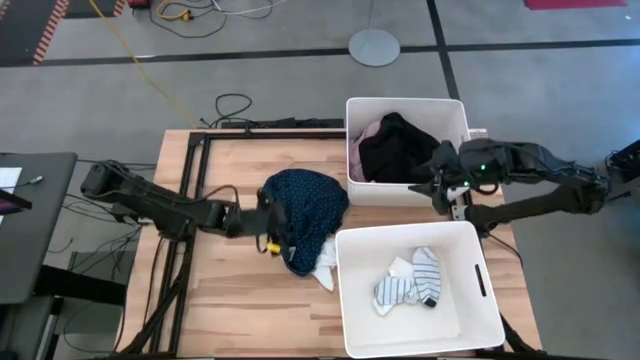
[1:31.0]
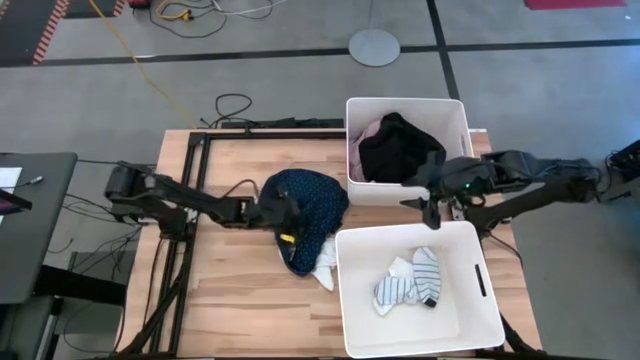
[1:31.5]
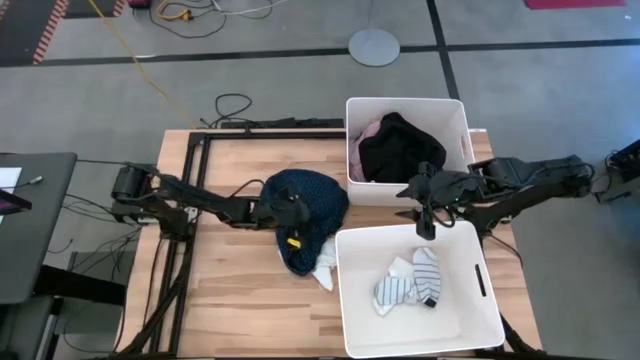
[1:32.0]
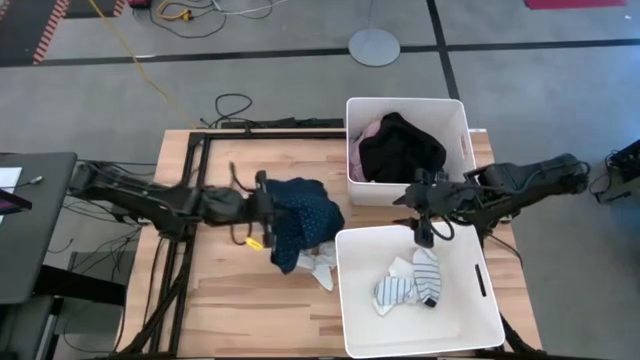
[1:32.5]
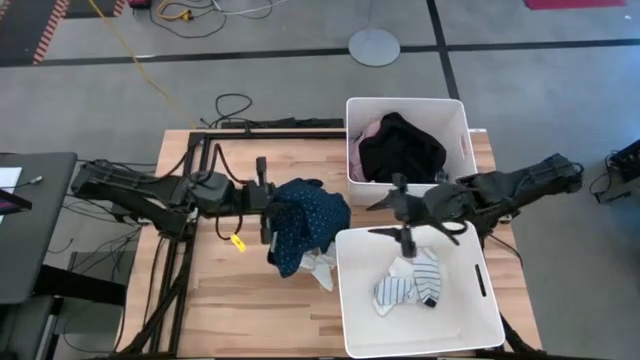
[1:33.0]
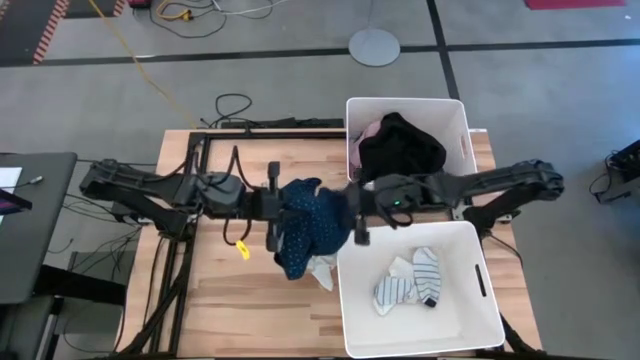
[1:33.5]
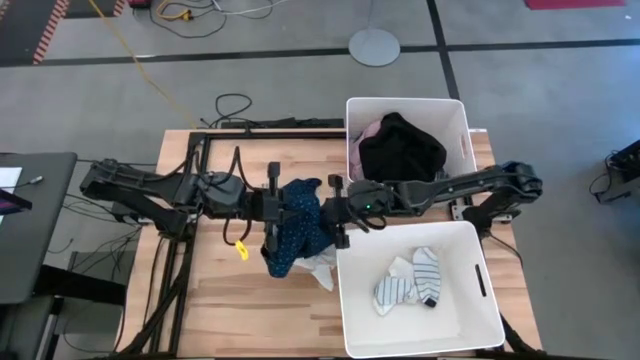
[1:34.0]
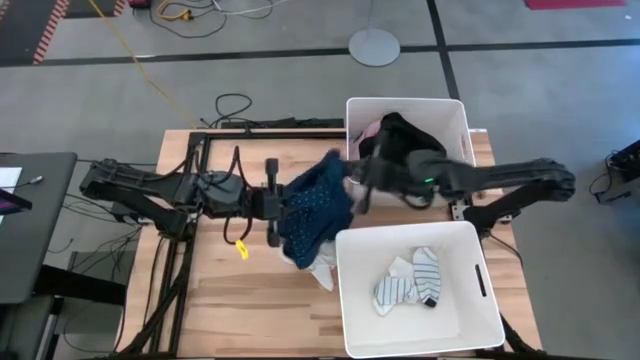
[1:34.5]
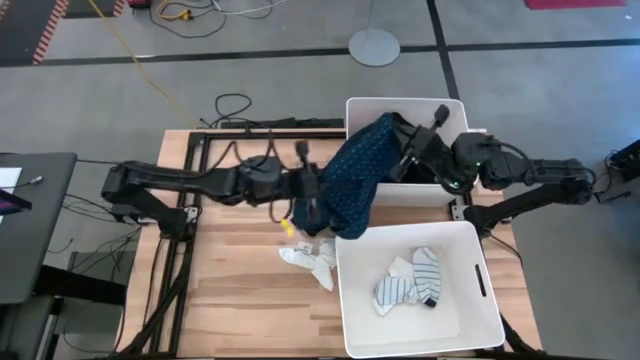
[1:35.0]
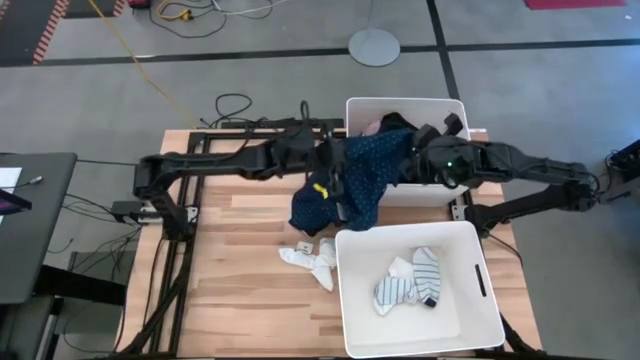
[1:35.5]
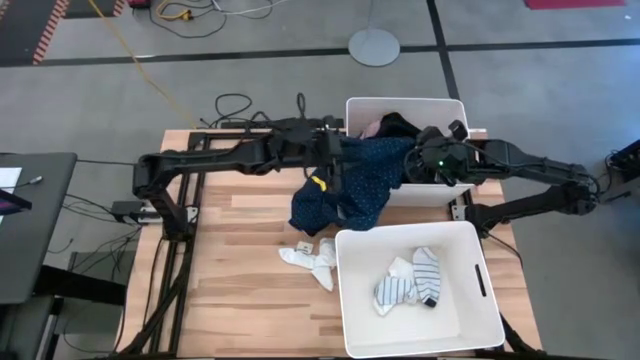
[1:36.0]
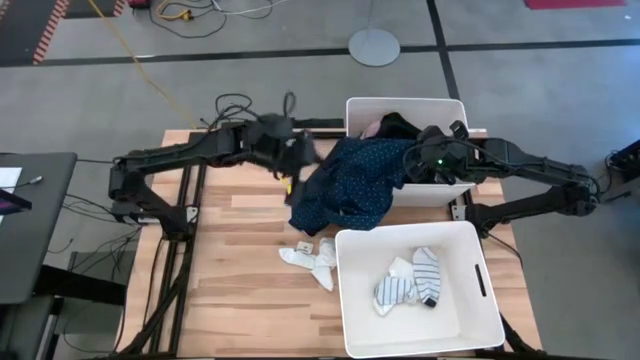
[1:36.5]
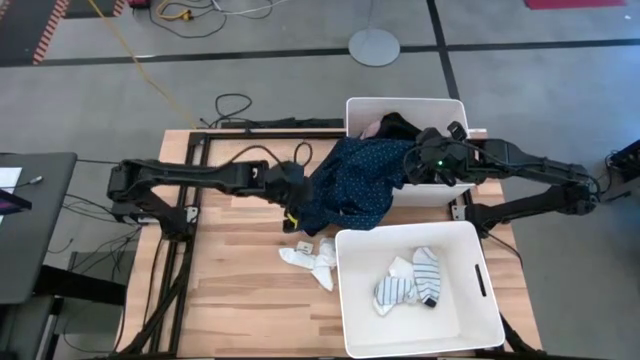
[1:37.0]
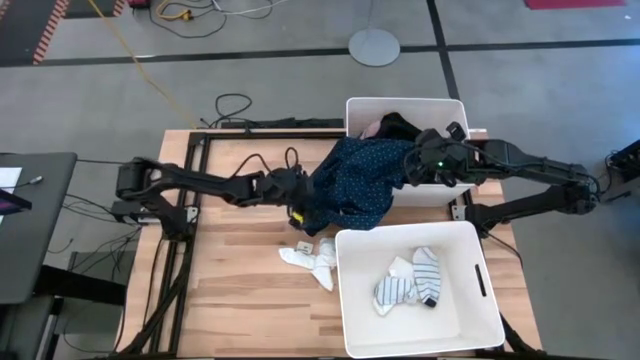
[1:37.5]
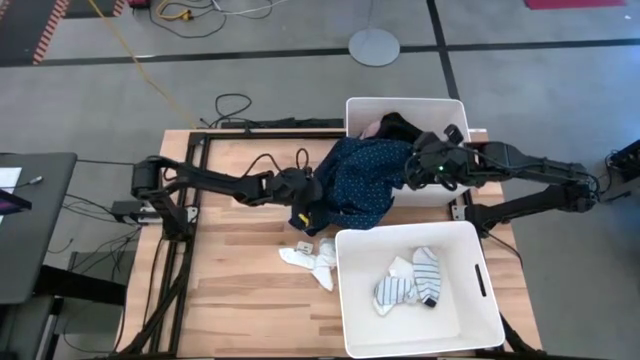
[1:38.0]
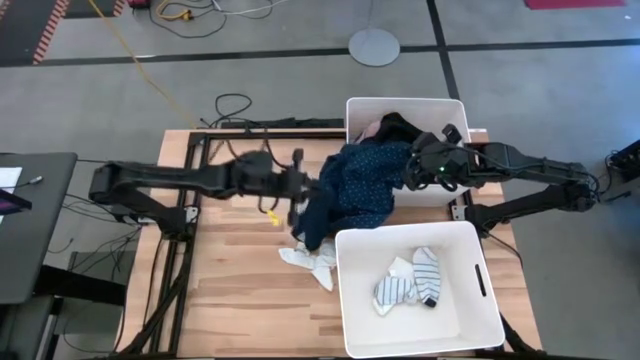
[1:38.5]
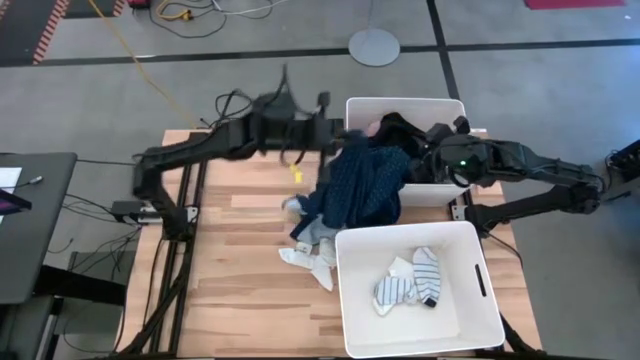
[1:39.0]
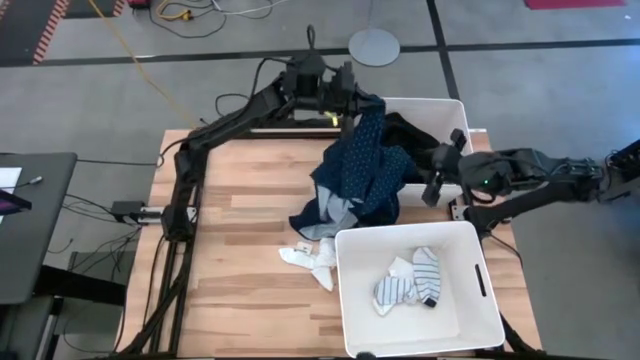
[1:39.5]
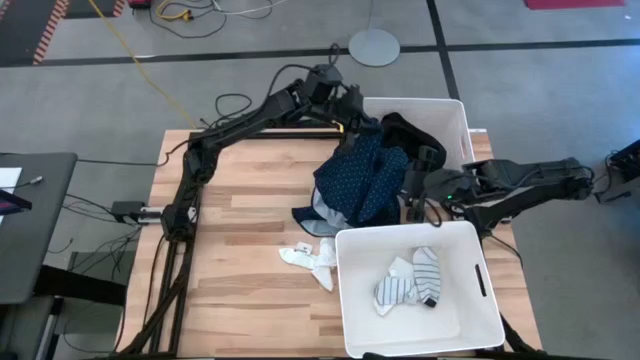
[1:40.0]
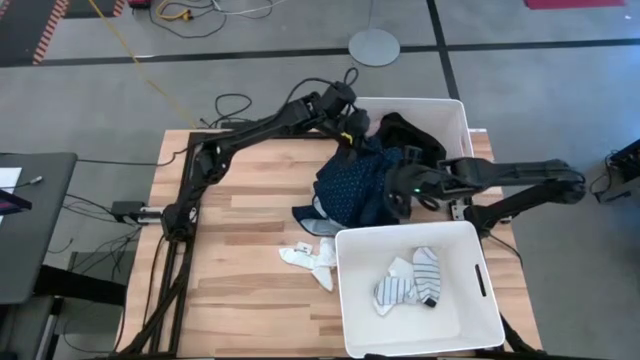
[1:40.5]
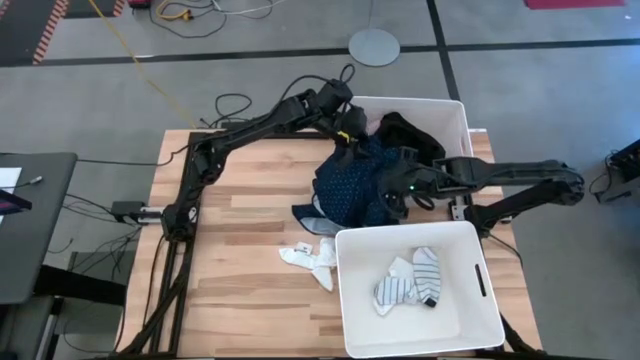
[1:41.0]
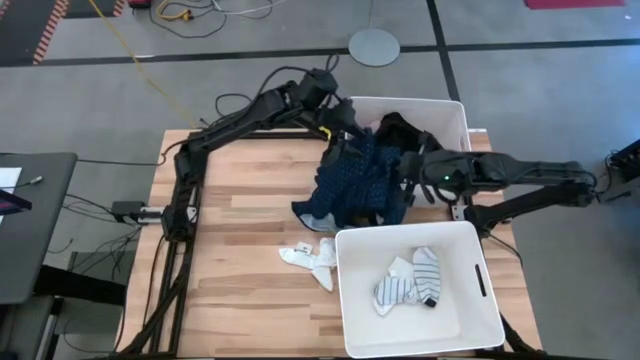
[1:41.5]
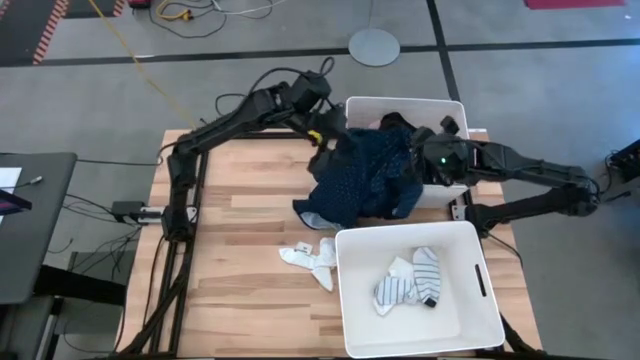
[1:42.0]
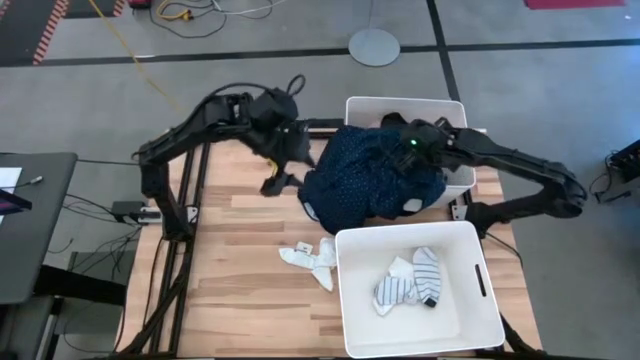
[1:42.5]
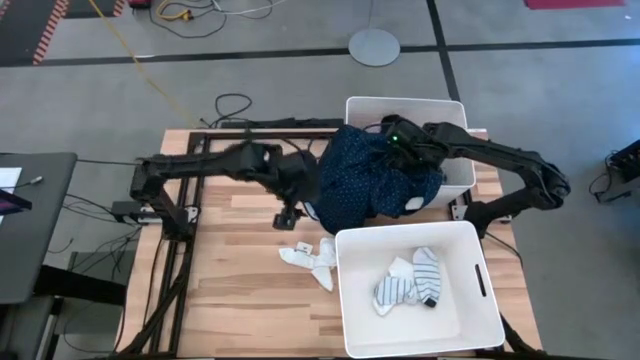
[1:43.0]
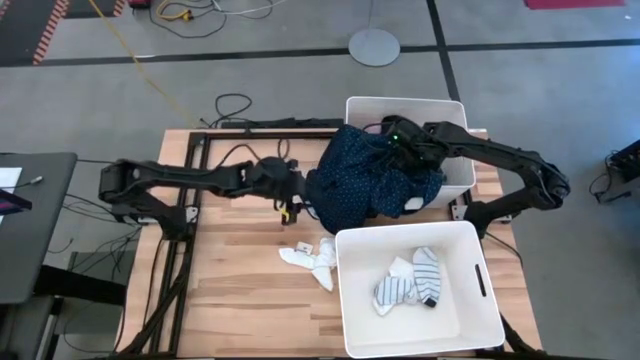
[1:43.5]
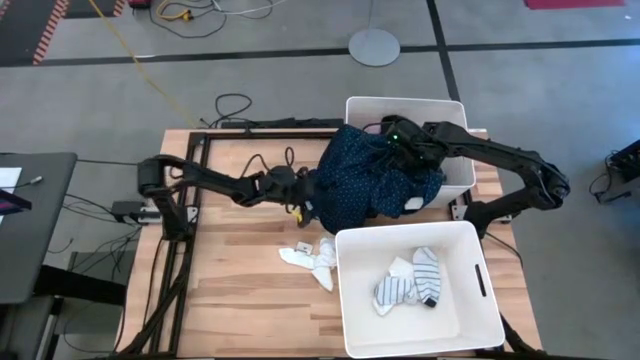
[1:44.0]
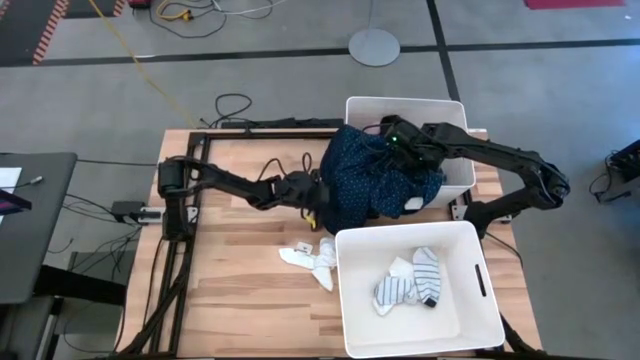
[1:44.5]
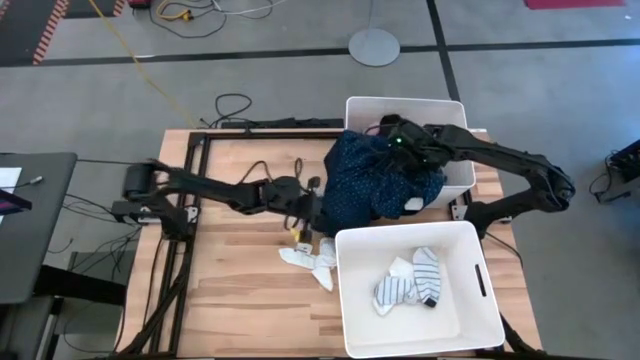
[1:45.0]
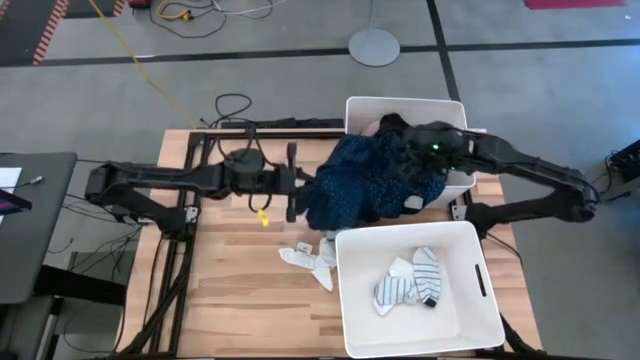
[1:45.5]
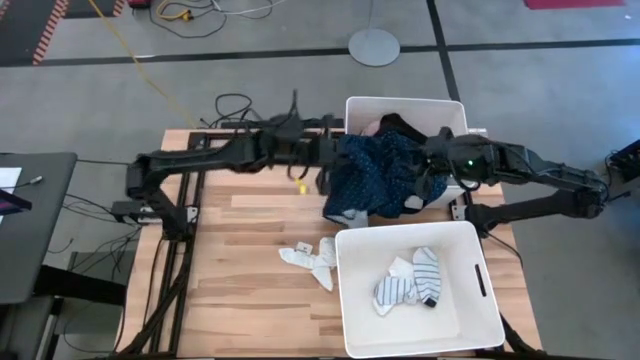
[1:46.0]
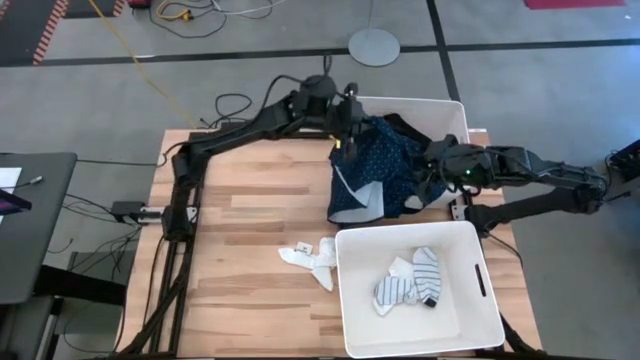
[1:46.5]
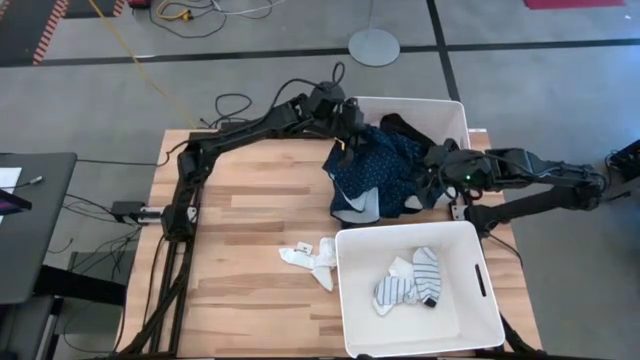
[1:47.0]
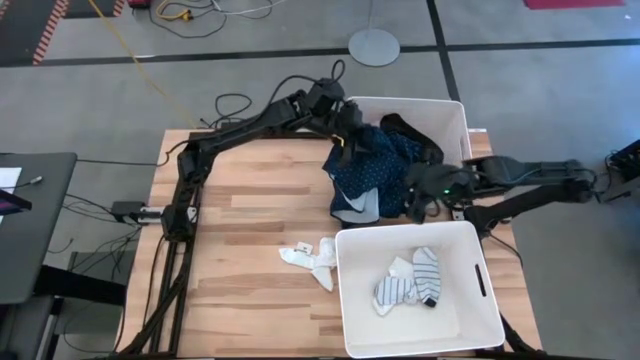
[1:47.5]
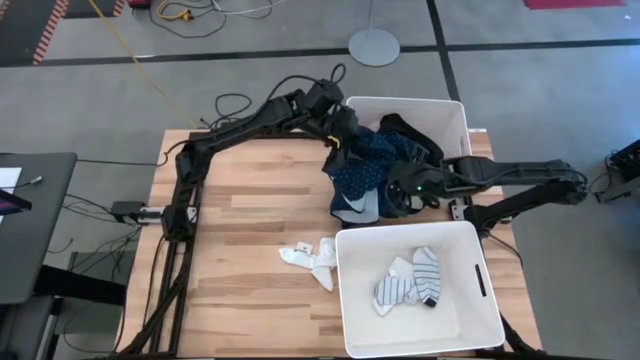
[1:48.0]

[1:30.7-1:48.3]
Task: Sort clothes
Put the blue polo shirt into the top white laundry bin

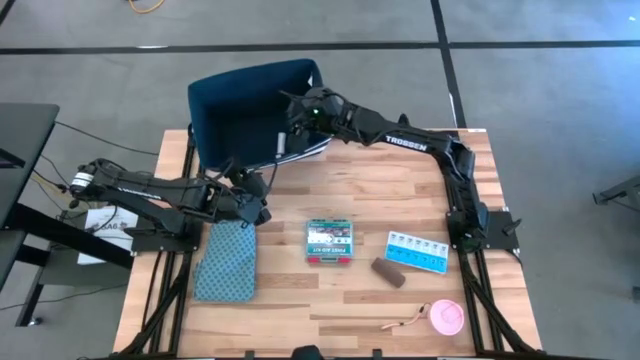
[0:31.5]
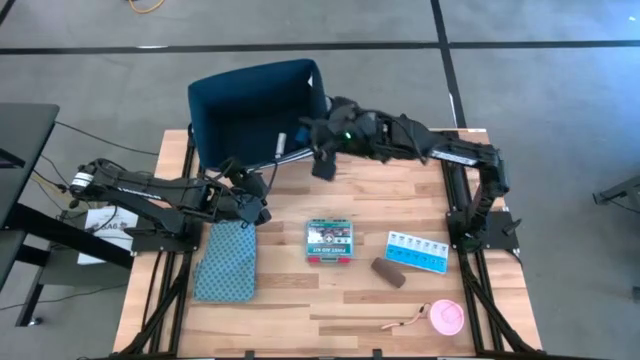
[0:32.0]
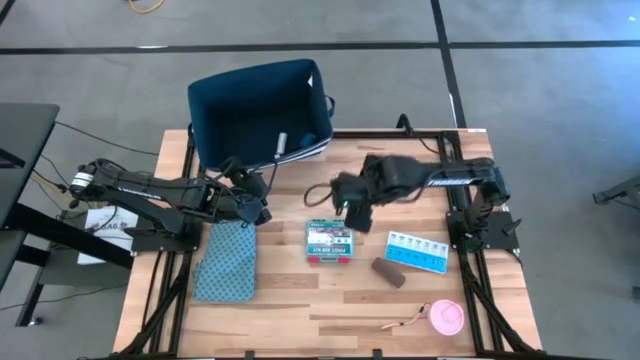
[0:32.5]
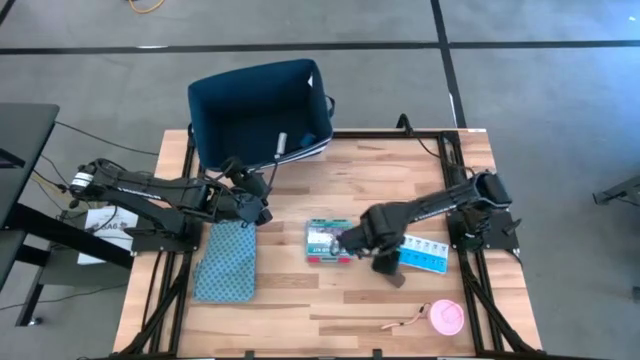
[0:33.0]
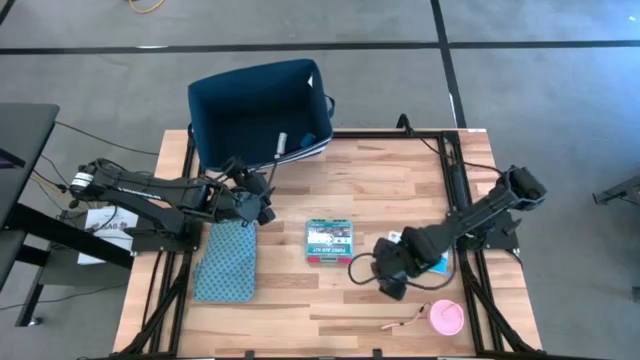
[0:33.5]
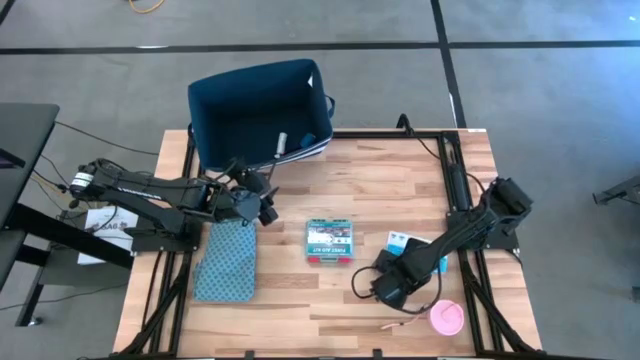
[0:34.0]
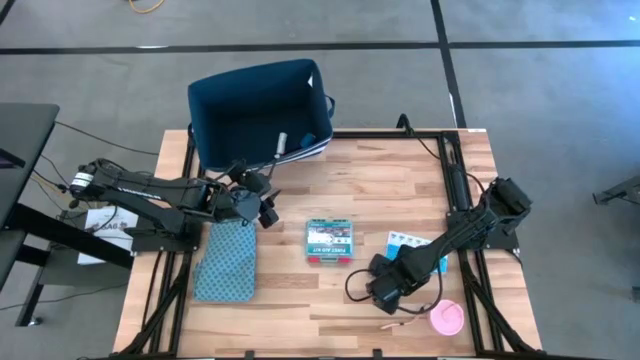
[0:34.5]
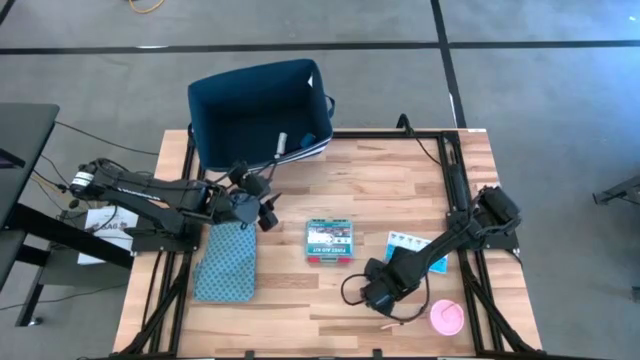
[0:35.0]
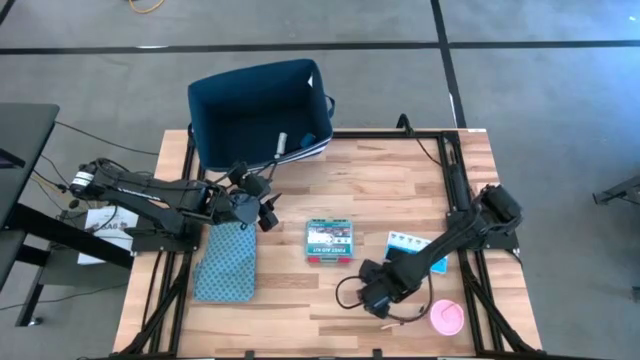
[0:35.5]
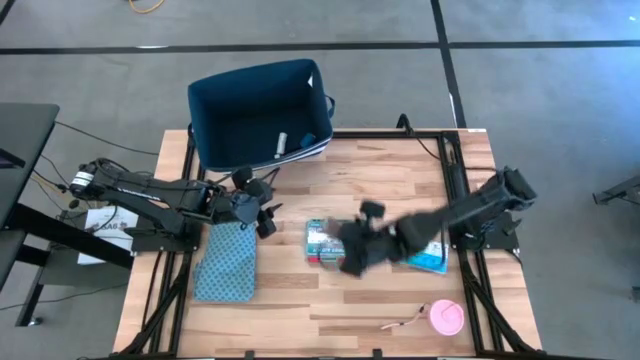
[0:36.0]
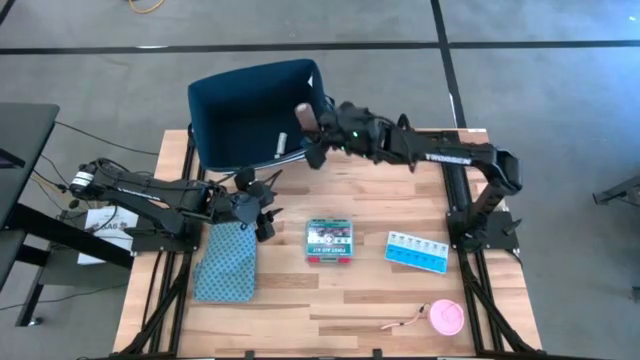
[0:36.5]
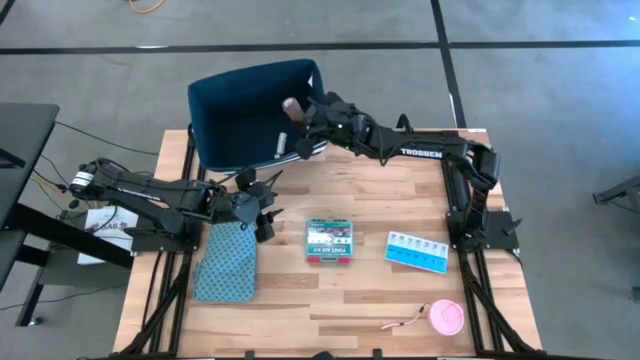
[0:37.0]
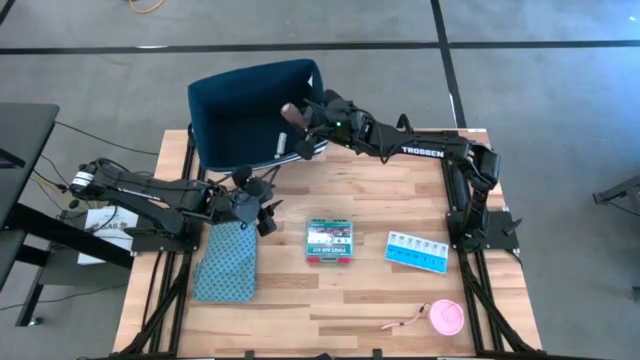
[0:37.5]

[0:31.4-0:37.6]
Task: Pick & place medical supplies in basket/bin
Put the brown bandage into the blue bin
